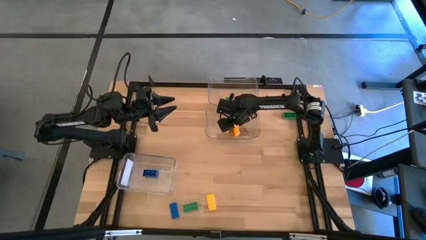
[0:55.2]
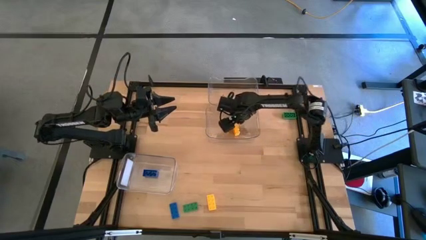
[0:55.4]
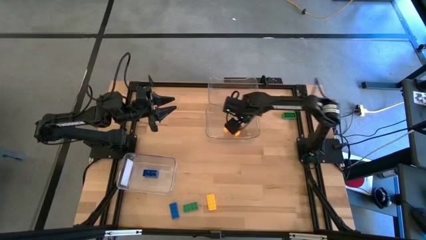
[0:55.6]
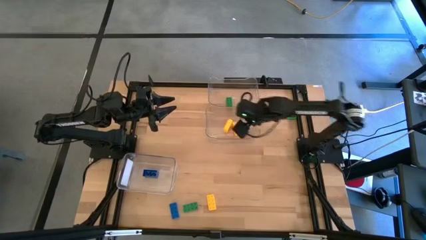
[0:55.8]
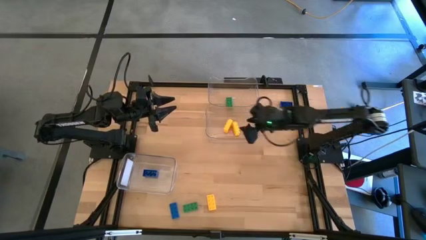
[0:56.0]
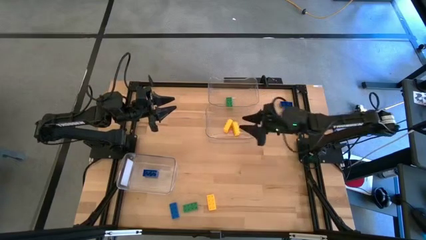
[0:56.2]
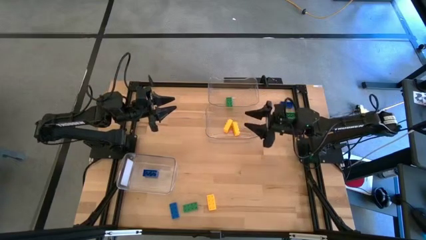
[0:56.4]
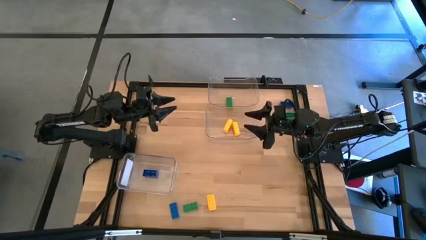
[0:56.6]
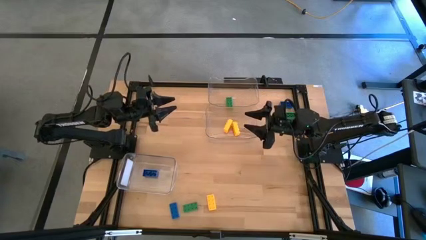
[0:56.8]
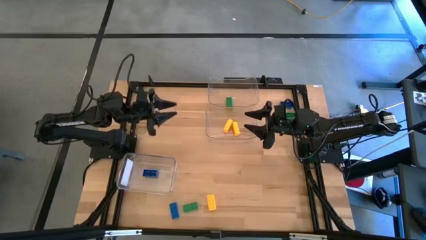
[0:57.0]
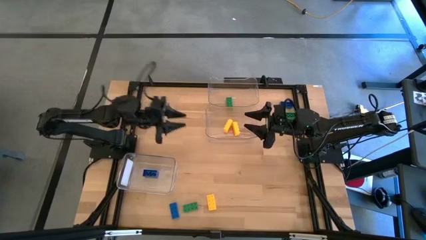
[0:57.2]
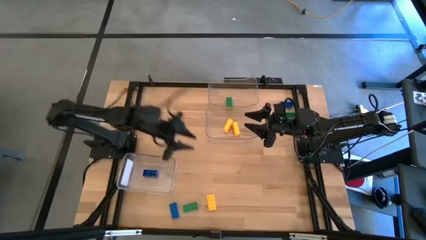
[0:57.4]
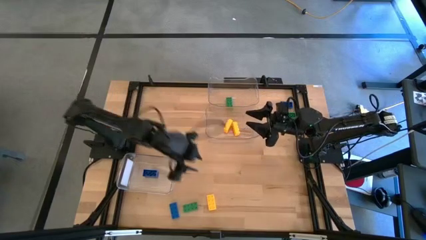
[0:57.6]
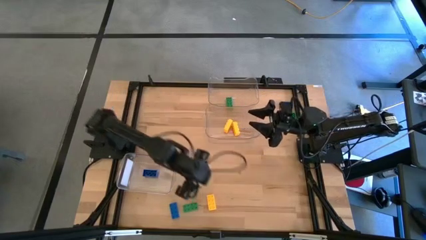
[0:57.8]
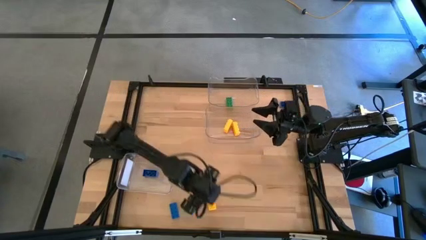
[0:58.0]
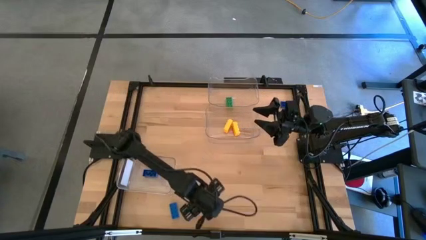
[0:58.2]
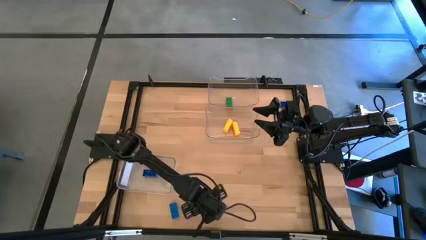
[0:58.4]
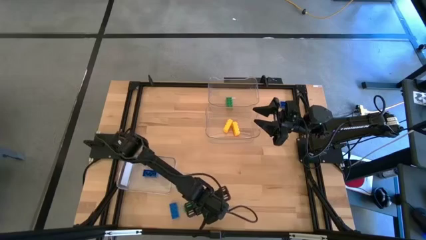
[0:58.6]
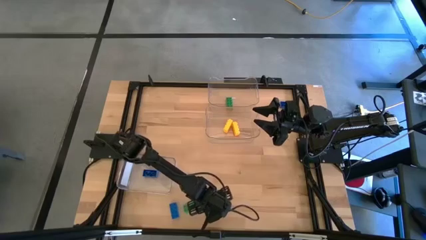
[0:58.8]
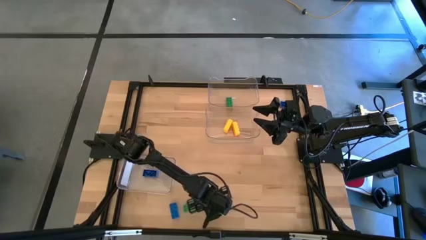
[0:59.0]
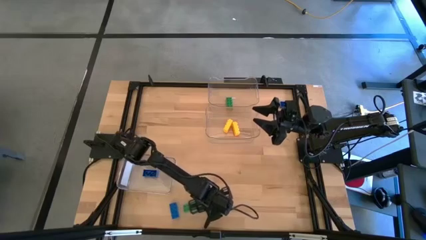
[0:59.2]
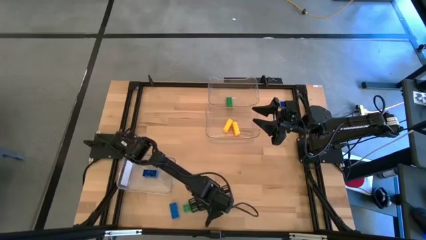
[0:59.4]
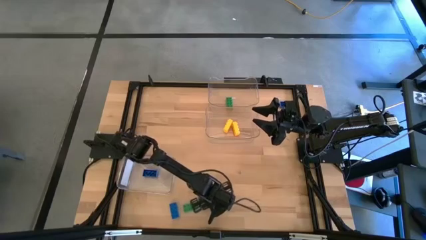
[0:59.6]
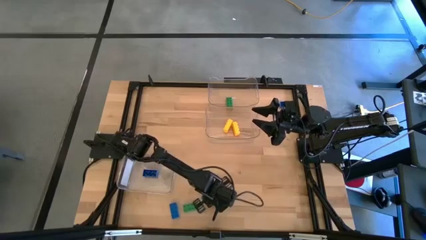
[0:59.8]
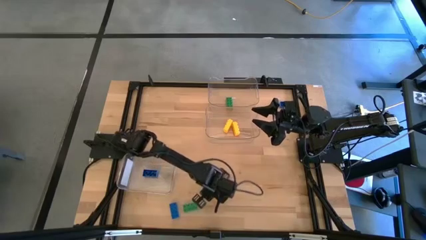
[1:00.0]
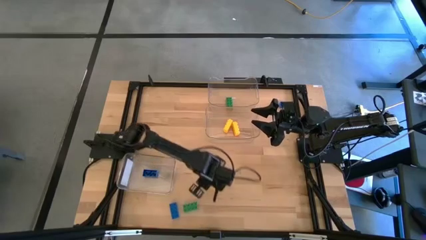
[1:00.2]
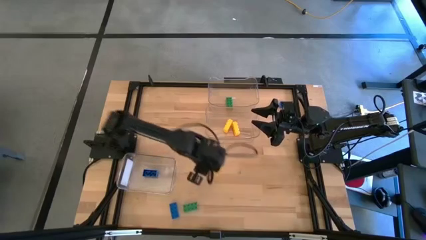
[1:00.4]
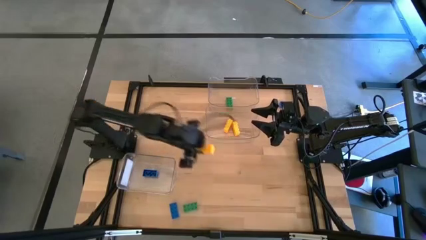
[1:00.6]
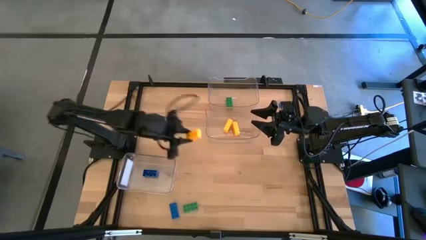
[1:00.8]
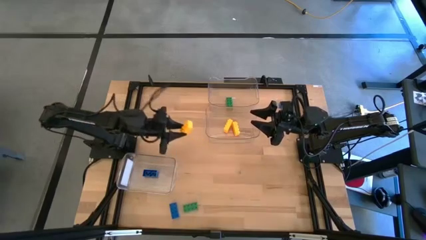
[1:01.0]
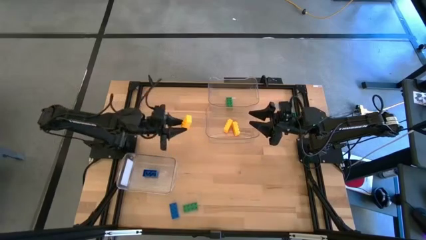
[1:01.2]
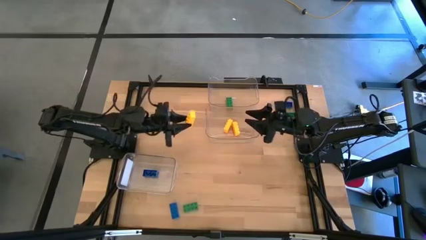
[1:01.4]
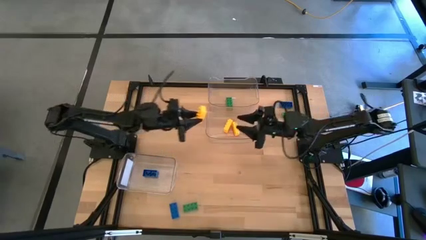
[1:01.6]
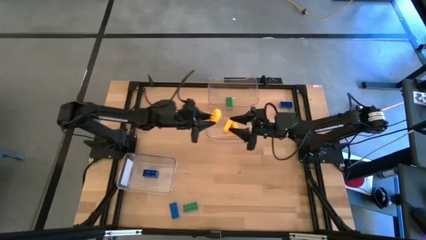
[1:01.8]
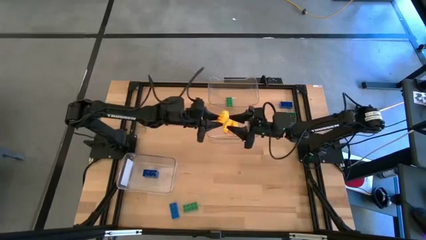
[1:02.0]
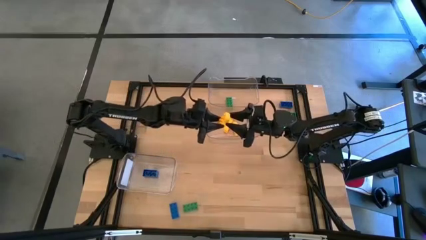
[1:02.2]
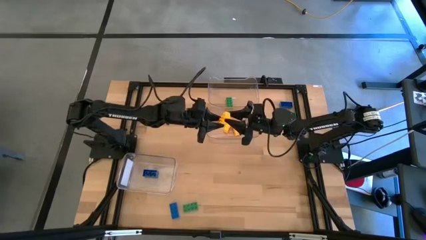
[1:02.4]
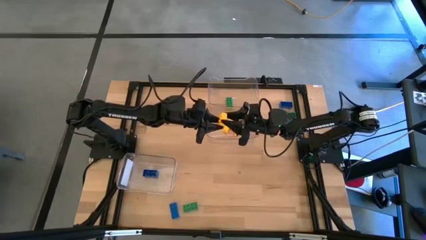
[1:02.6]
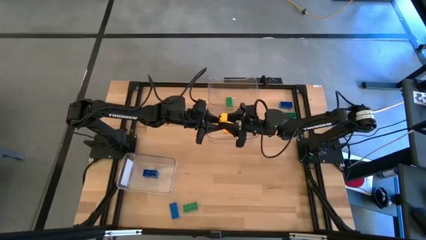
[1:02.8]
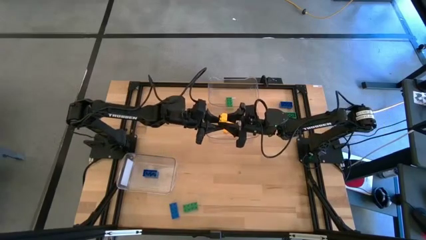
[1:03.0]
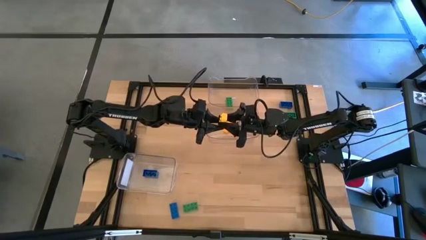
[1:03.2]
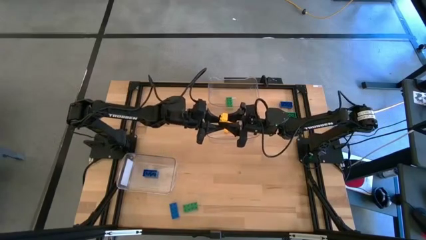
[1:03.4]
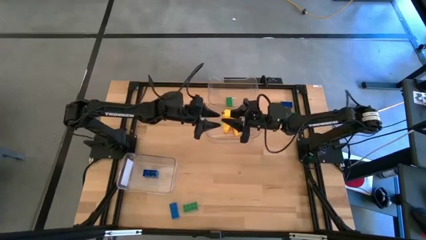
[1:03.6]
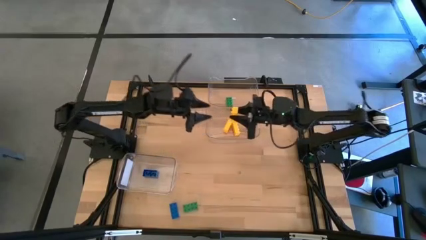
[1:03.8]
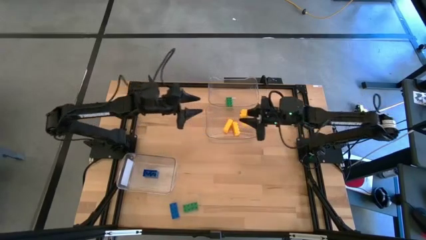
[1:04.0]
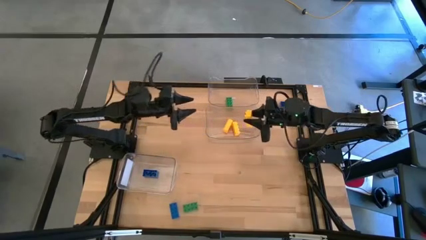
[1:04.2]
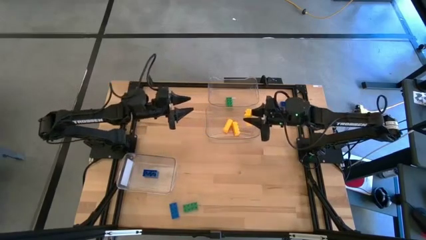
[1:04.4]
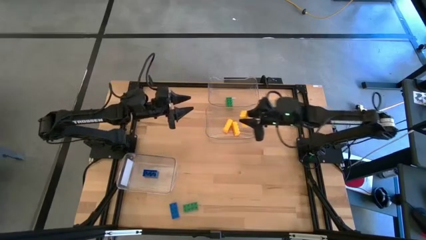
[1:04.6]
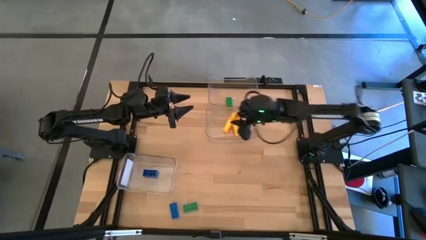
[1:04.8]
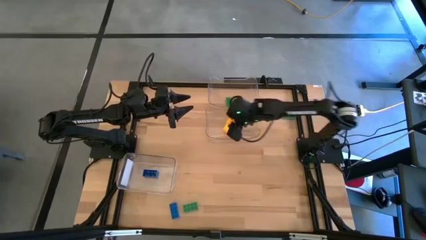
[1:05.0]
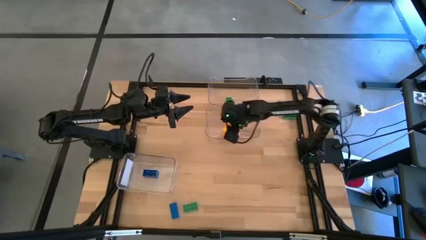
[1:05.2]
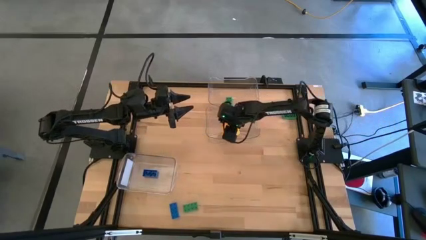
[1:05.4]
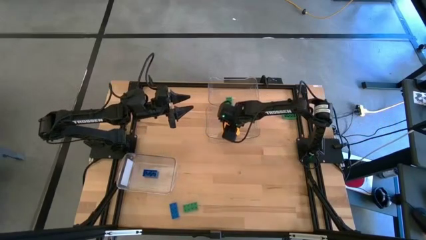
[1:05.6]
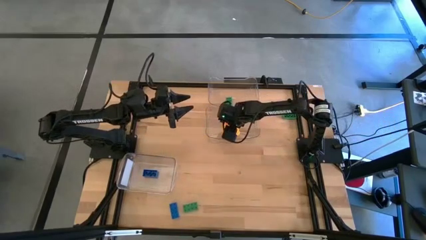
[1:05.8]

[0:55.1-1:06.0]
Task: Sort & place blocks by color
Put the yellow game piece into the center transparent bin
